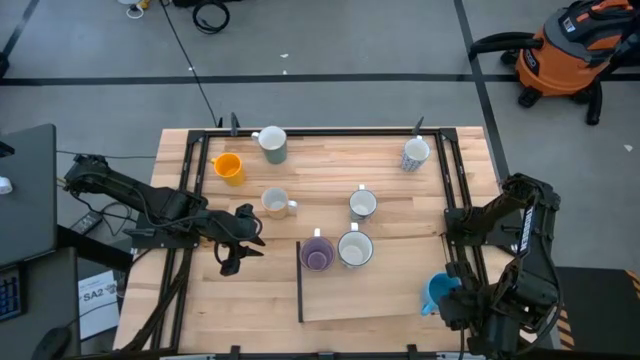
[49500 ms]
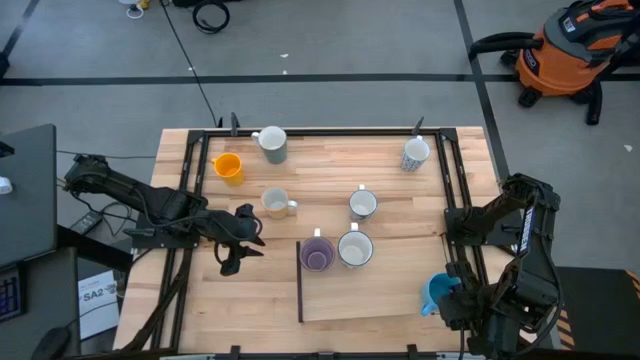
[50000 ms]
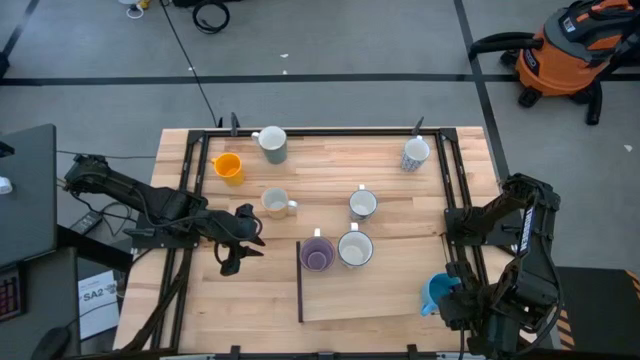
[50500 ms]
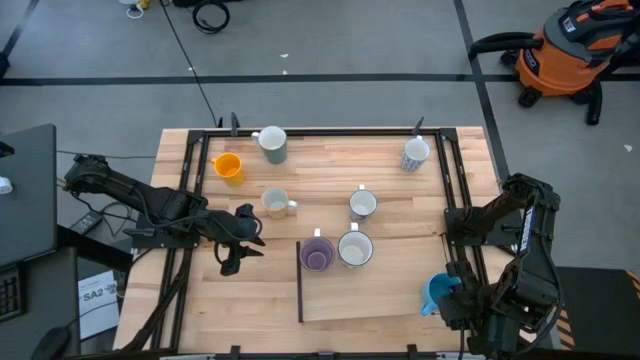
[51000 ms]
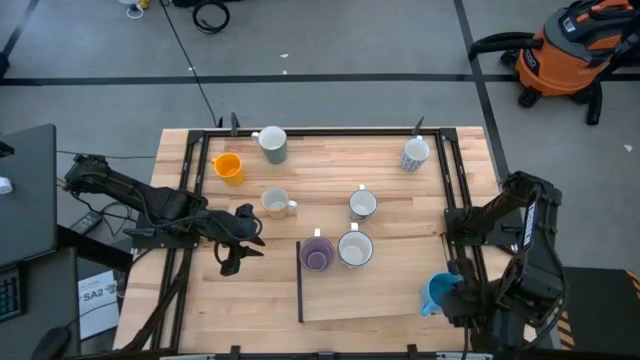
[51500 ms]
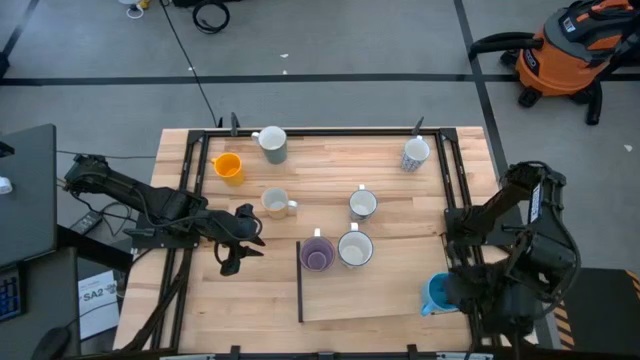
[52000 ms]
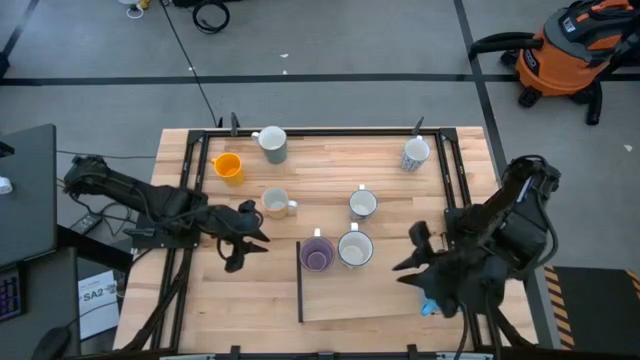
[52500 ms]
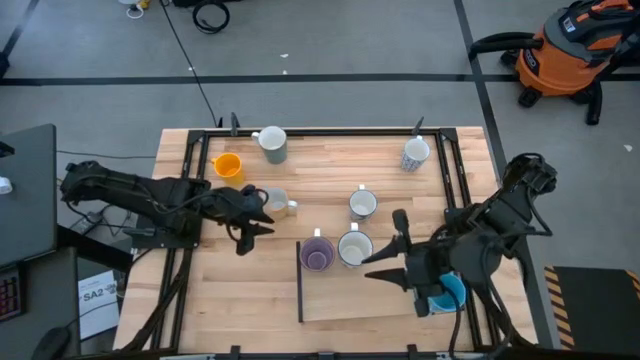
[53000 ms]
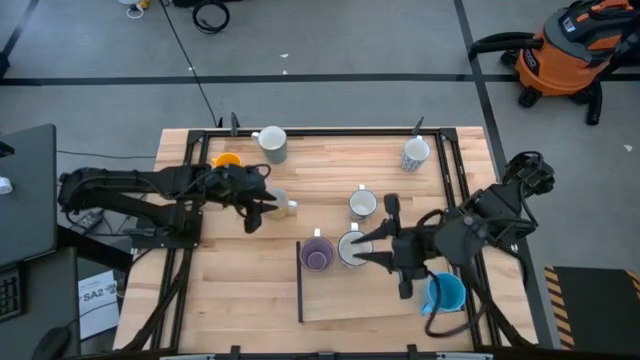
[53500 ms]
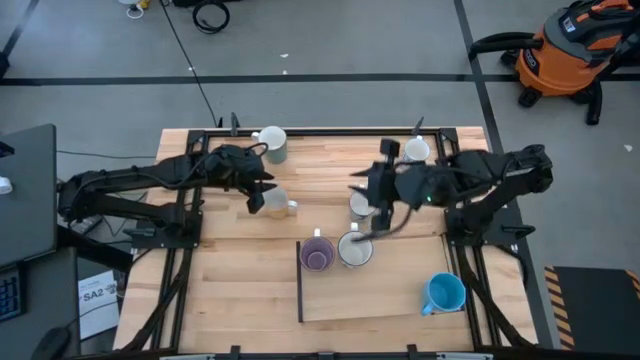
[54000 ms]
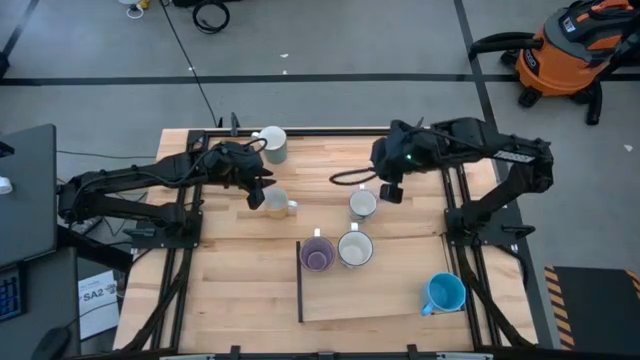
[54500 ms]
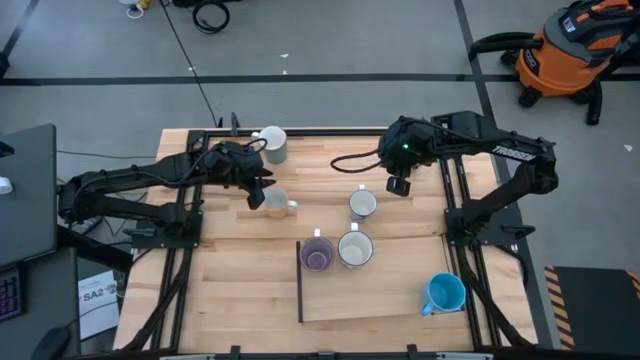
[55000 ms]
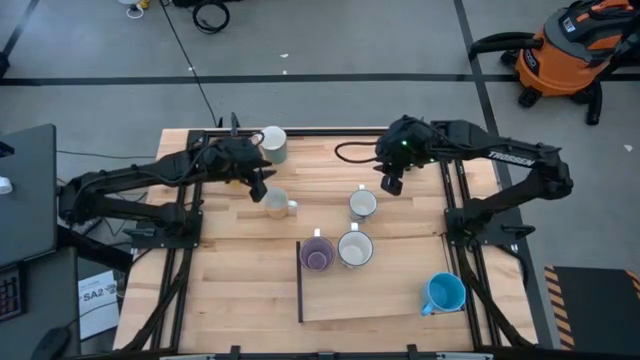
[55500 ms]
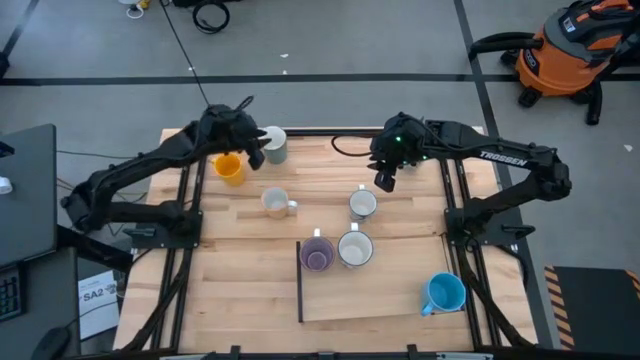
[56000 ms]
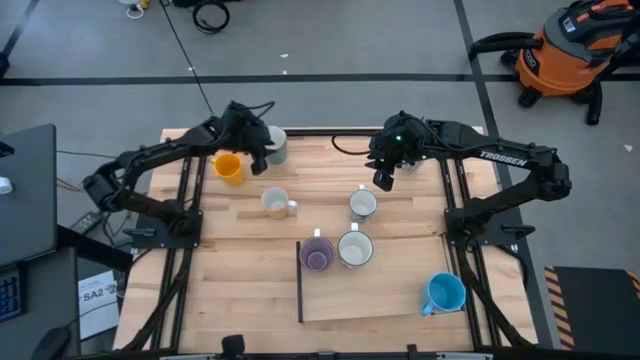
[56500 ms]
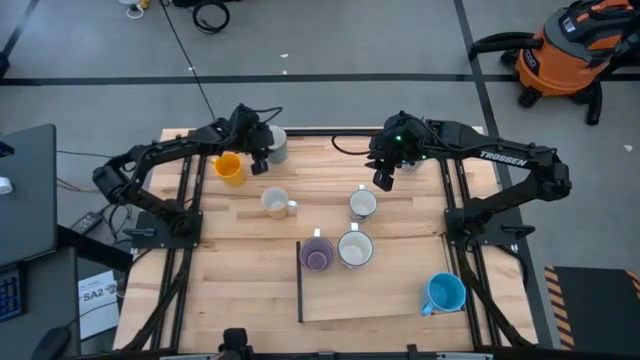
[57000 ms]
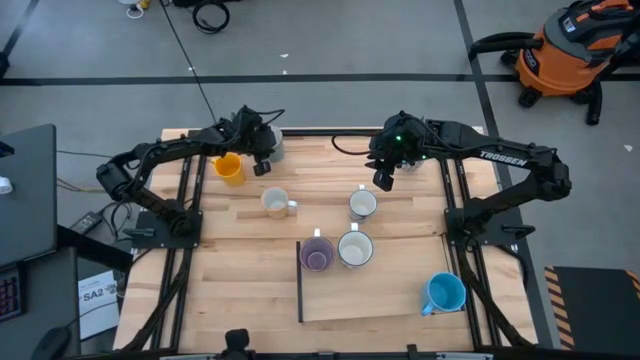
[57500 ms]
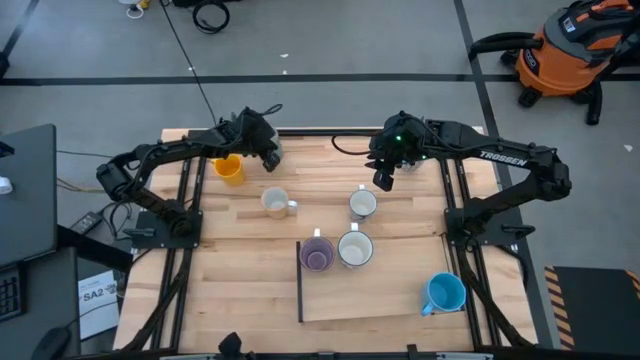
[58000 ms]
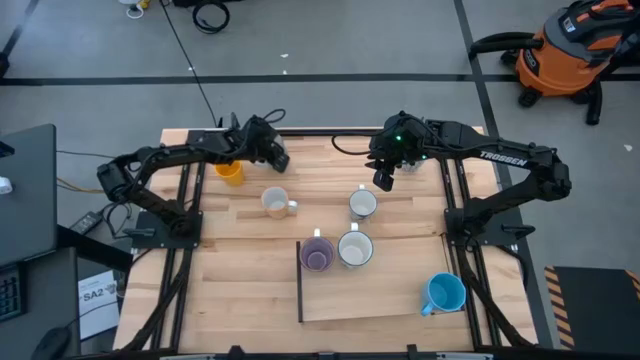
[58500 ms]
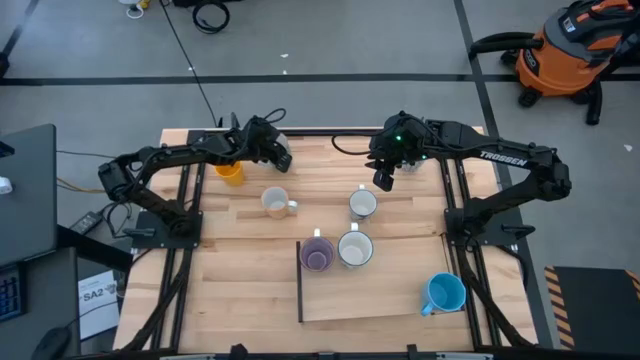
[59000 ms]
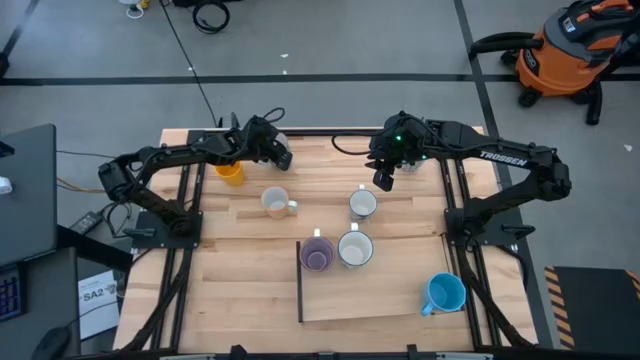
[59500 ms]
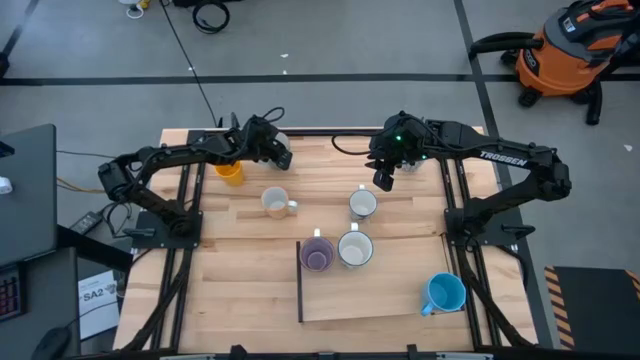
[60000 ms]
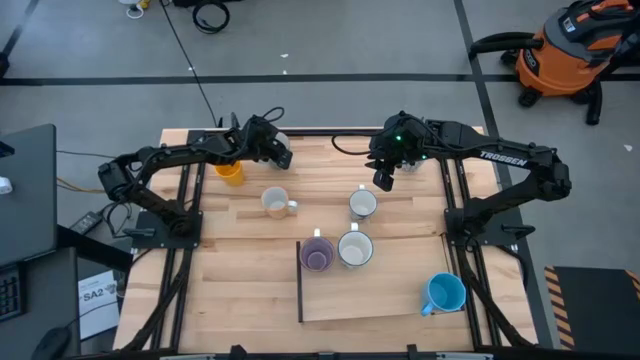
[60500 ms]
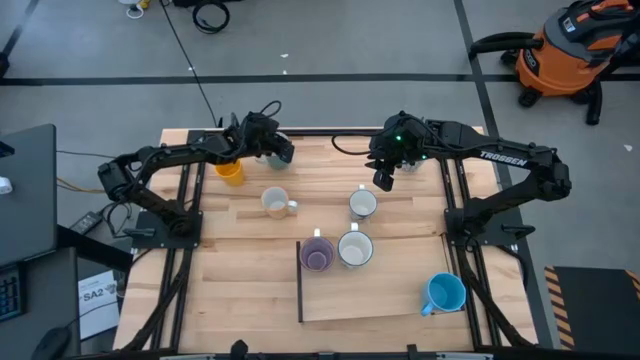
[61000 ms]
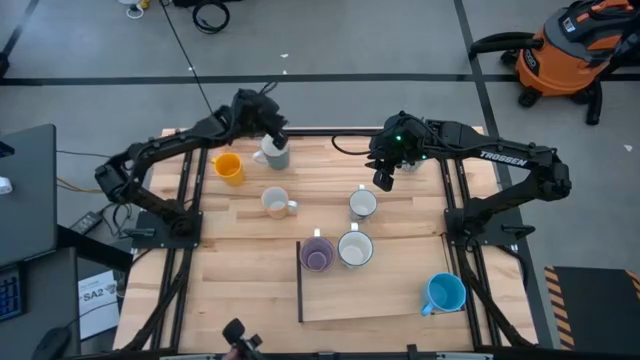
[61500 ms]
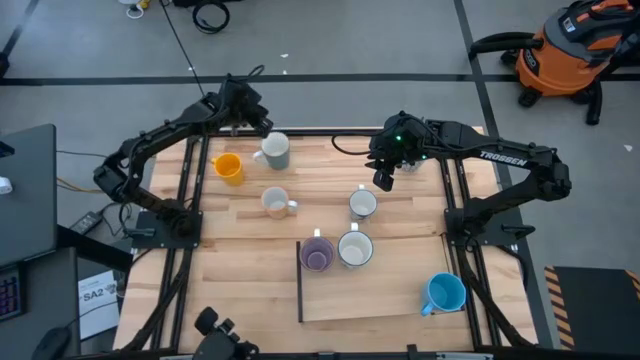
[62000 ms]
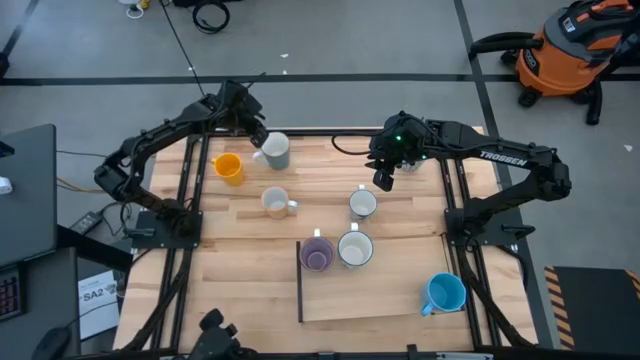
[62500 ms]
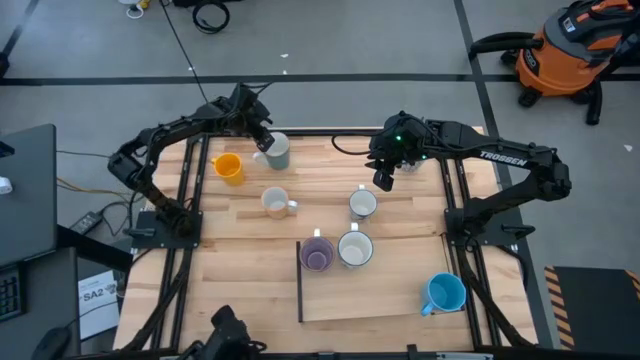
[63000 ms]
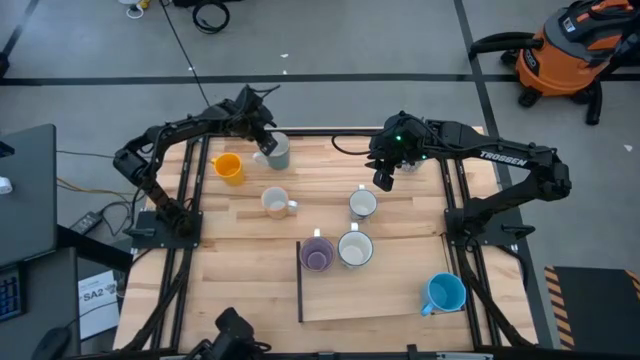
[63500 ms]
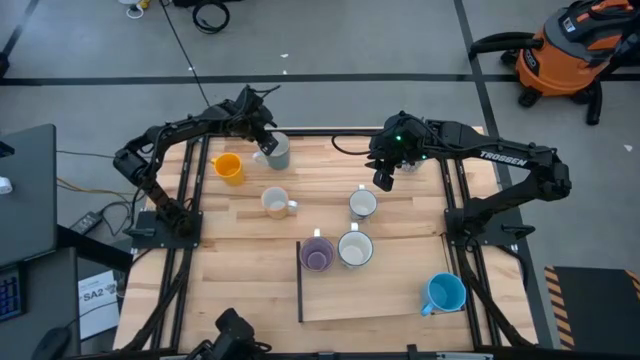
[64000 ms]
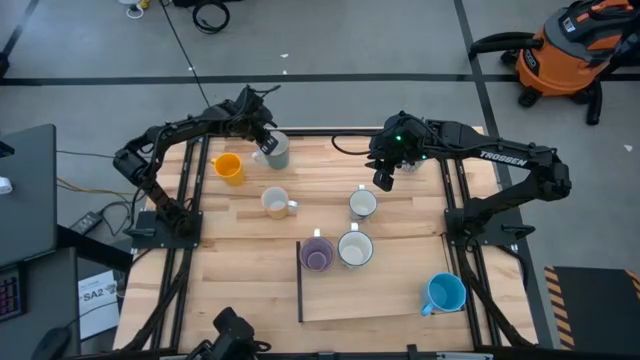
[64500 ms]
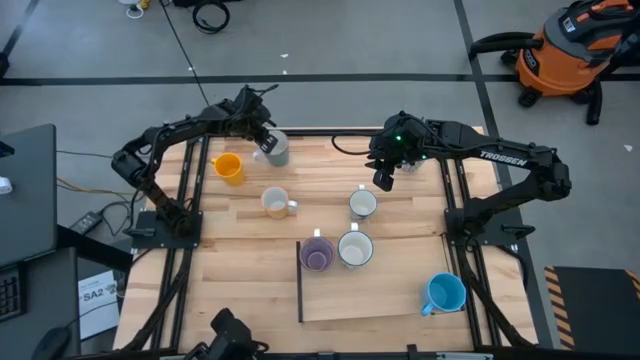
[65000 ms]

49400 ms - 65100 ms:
Task: Place coffee mugs
Put the green blue mug on the shelf

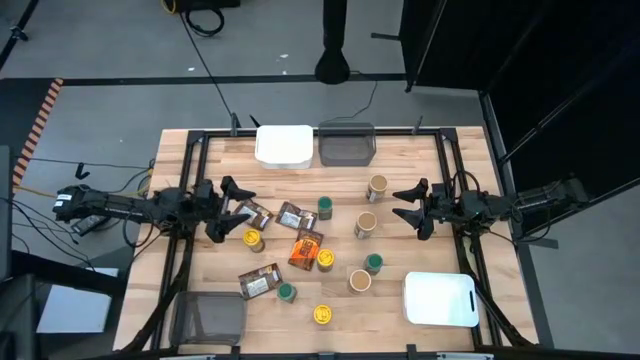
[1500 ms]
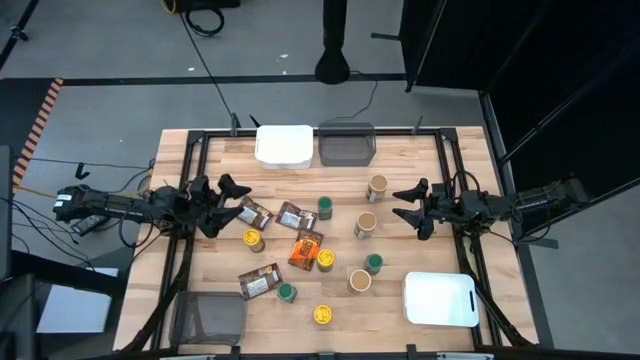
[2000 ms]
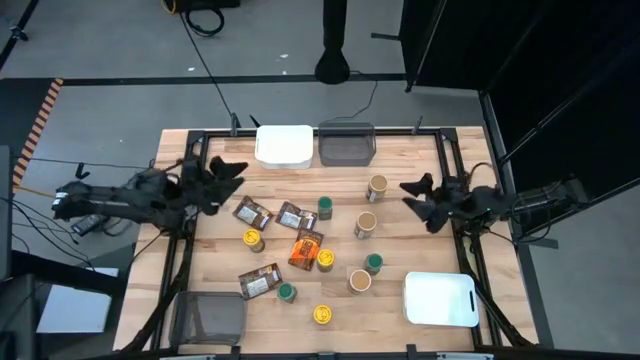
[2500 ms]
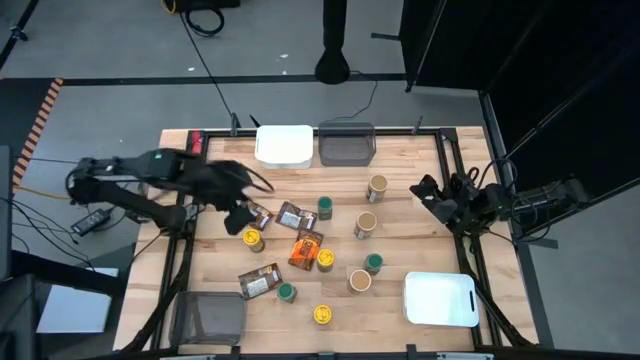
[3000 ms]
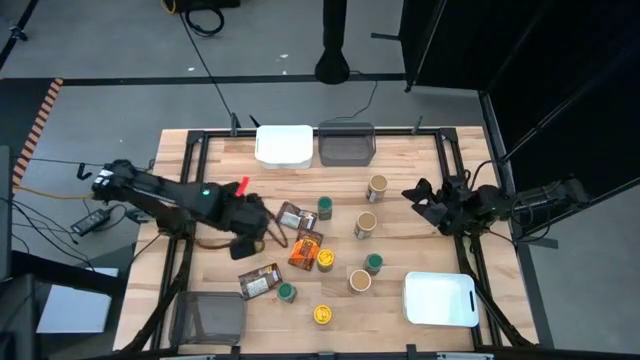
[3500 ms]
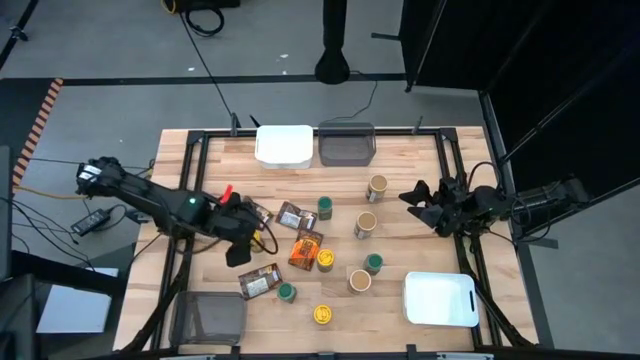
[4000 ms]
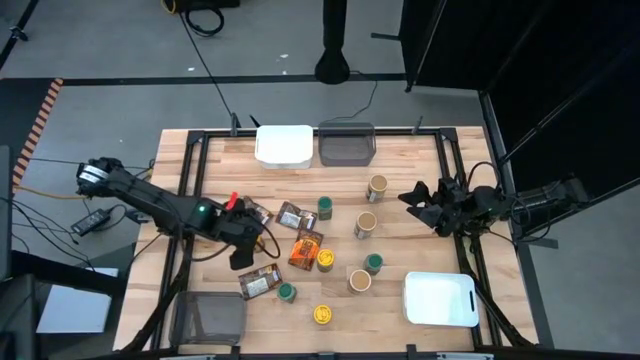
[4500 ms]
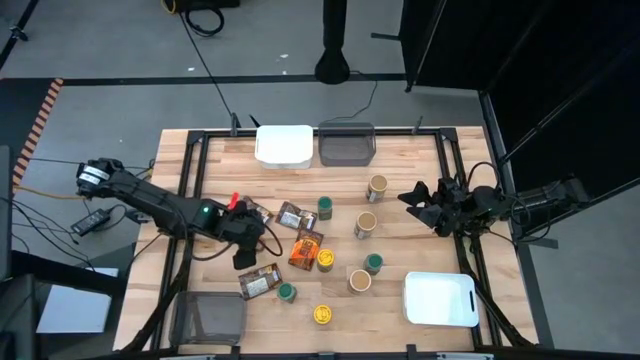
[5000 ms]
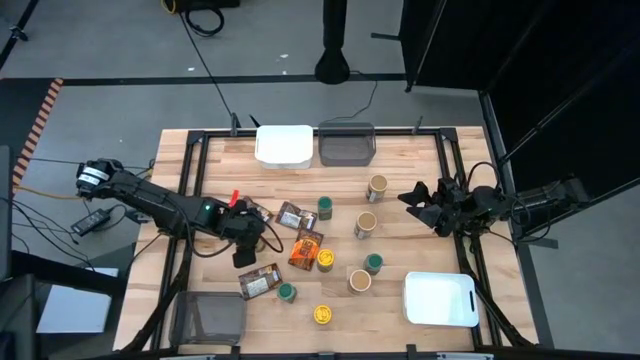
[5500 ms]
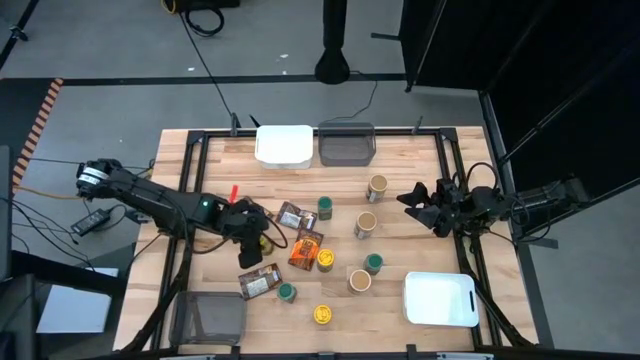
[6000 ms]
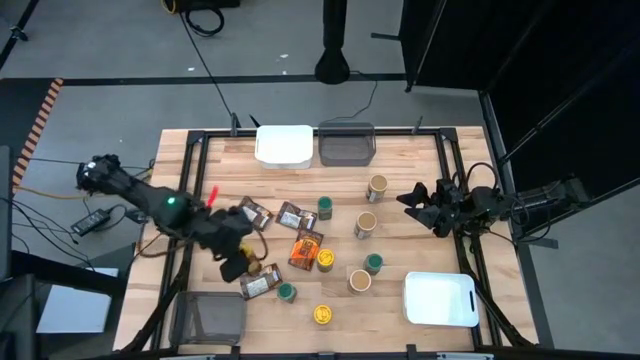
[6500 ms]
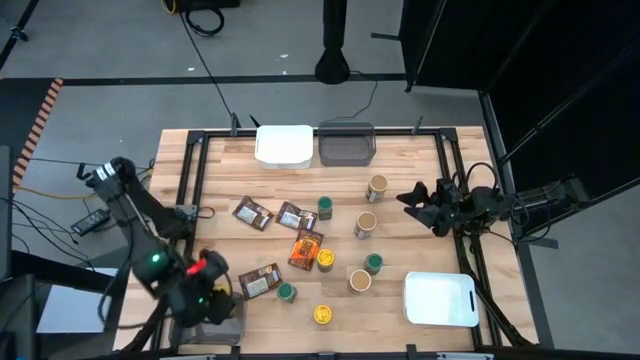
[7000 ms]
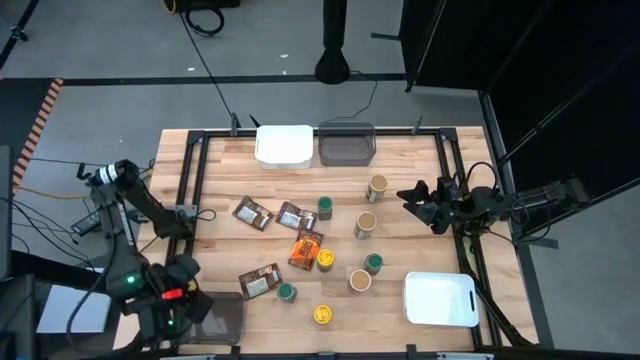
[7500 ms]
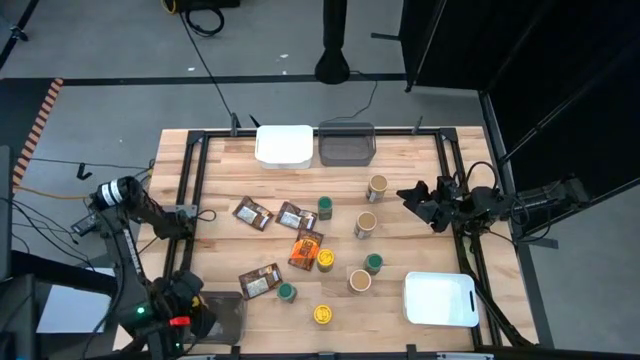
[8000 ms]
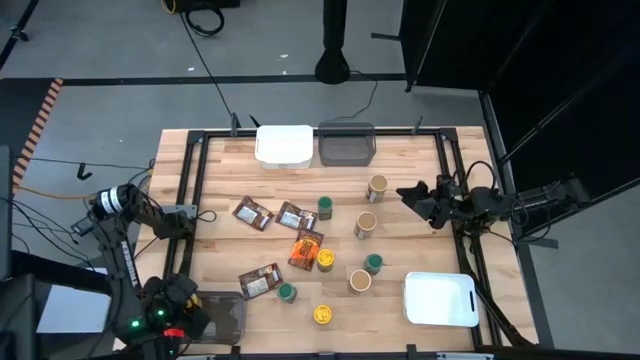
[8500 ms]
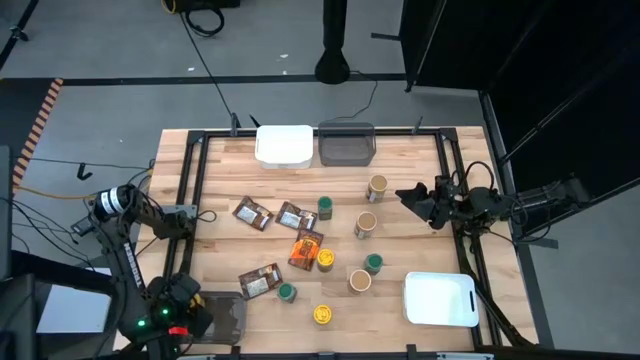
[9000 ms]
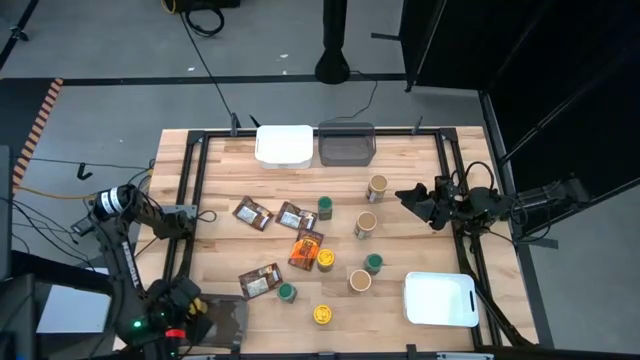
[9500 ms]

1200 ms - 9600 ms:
Task: Sort spices by type
Put the yellow seasoning bottle into the bottom black bin
